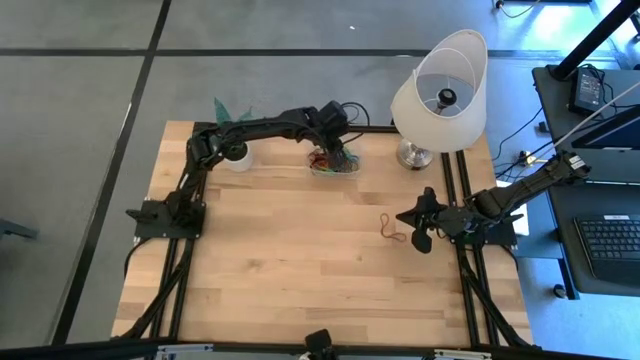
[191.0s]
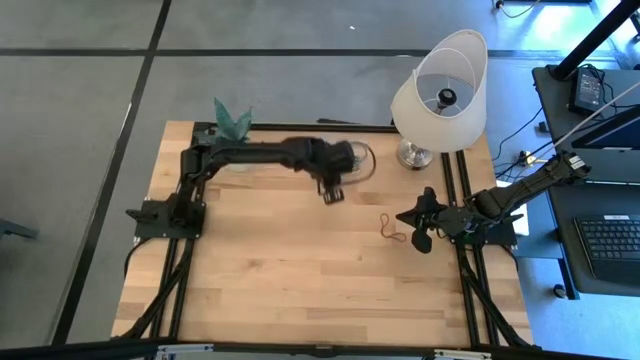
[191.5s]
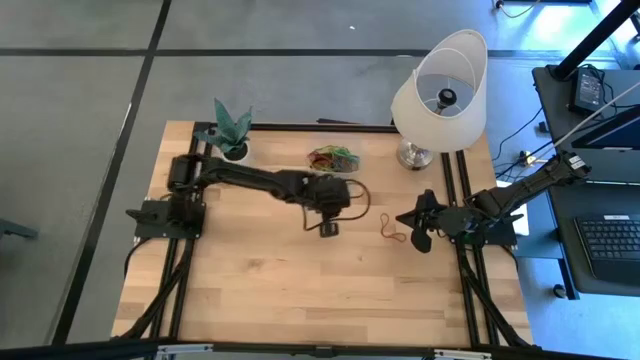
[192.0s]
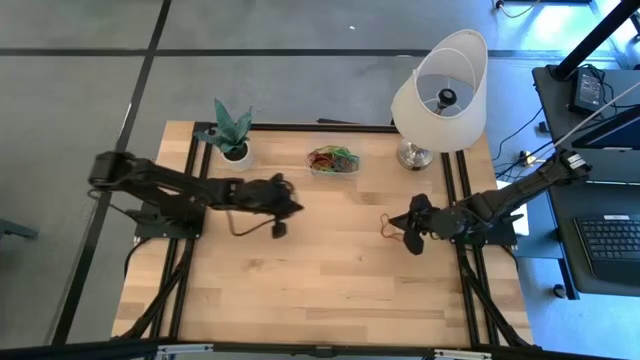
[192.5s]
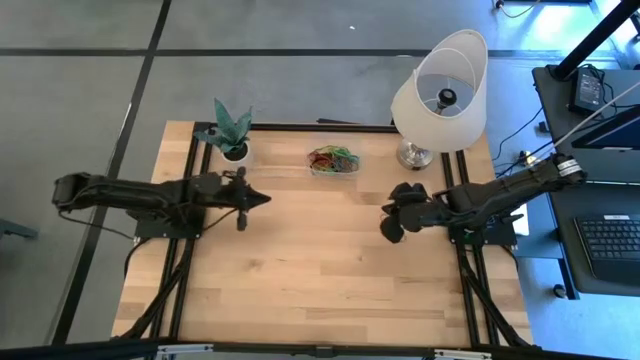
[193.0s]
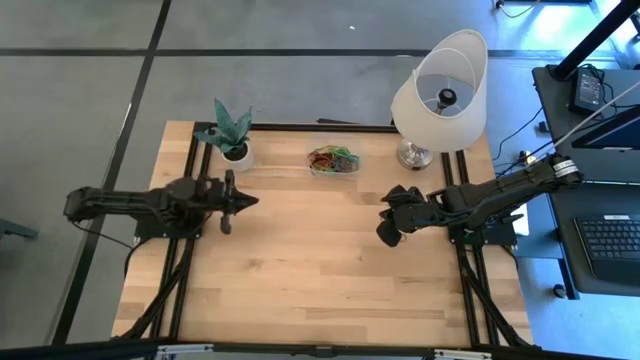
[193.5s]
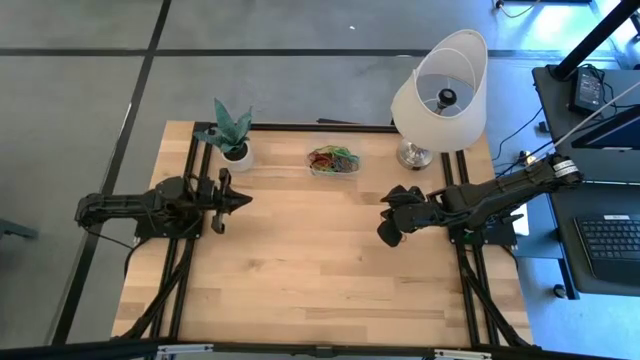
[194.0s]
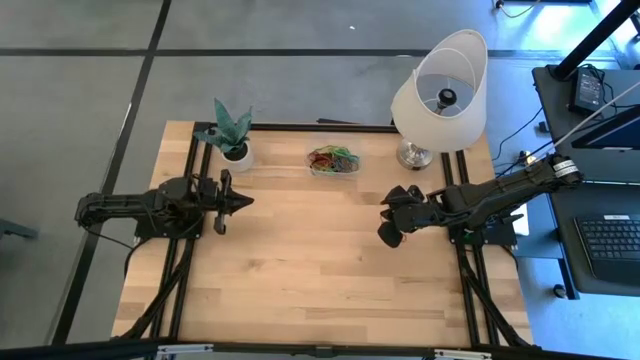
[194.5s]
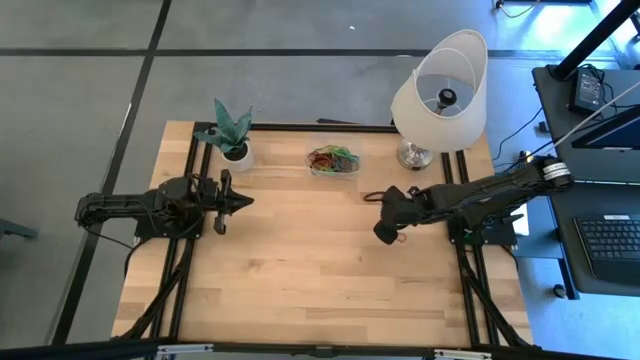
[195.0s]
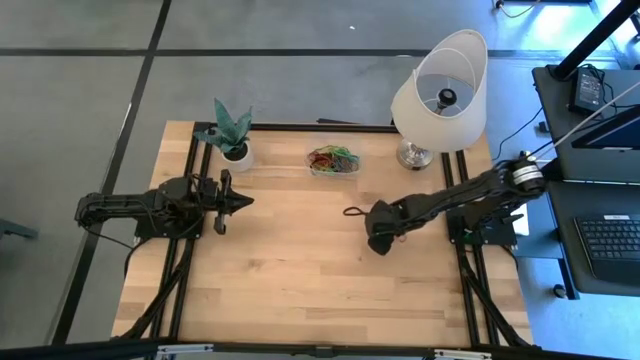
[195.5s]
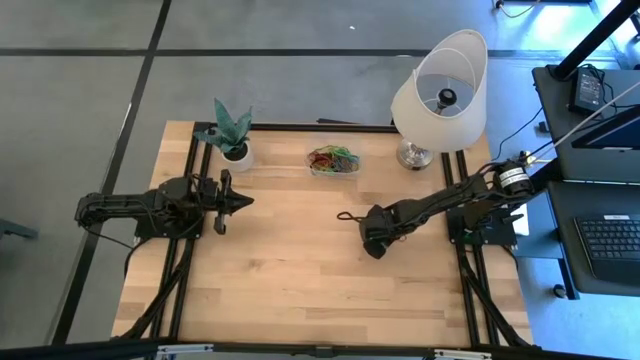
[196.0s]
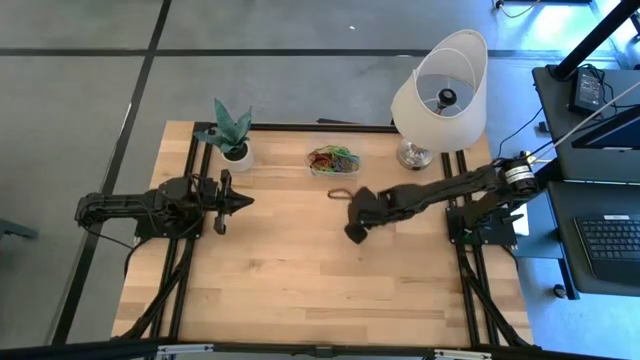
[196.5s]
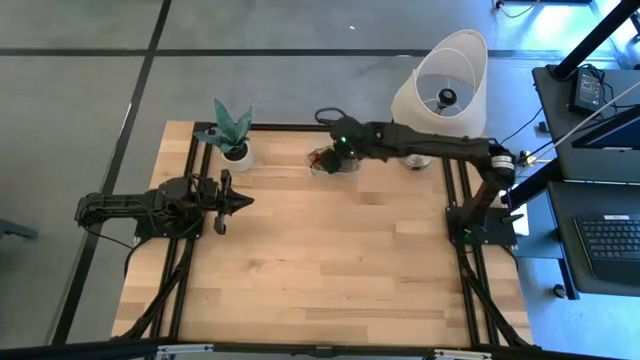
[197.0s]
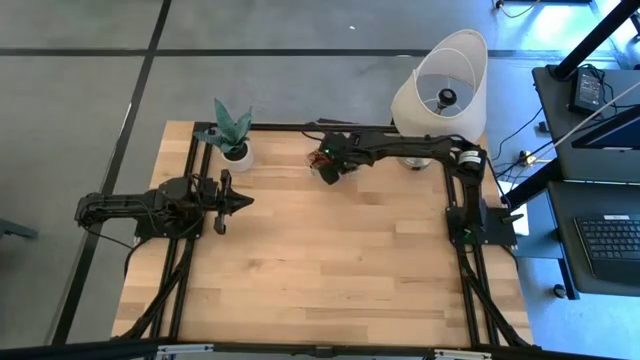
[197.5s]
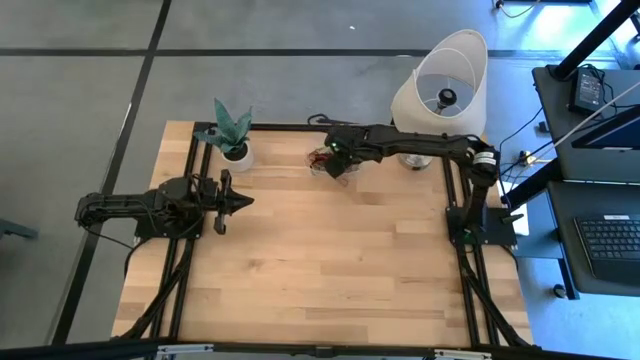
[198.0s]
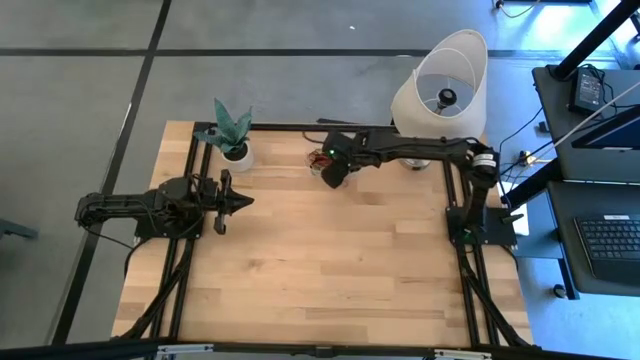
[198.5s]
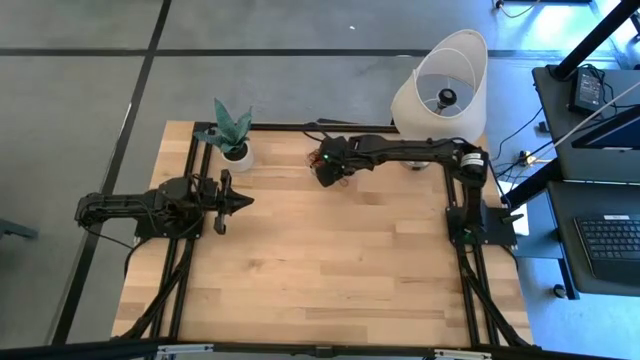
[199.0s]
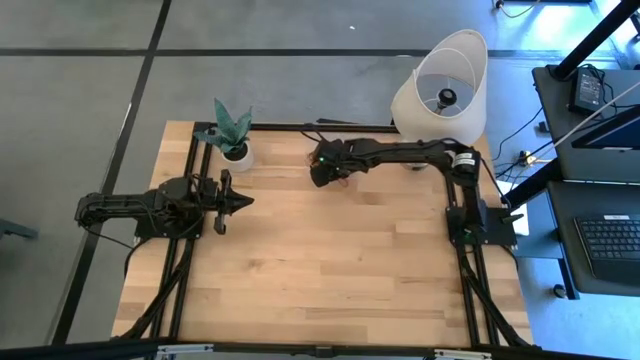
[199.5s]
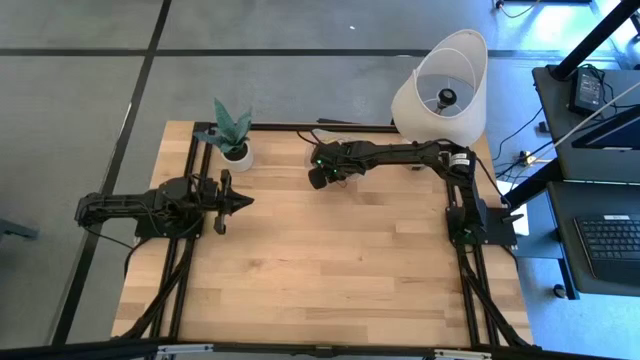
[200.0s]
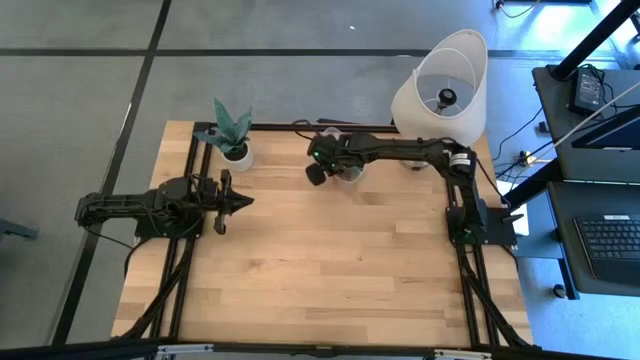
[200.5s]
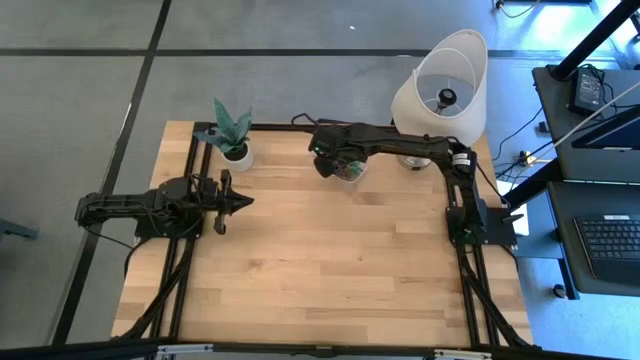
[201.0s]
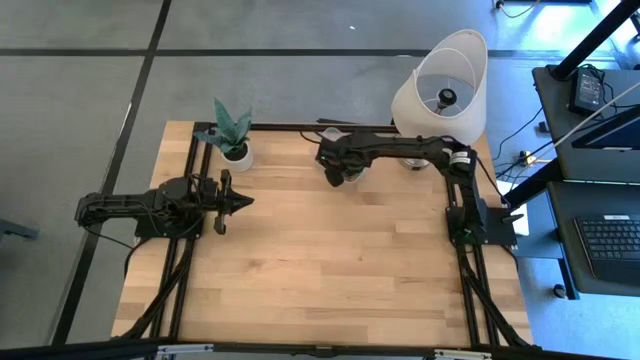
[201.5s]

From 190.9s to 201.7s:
Task: Pick and place rubber bands into bin
Put the red rubber band into the transparent bin

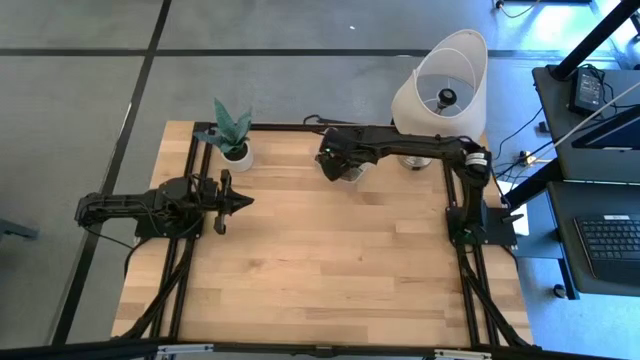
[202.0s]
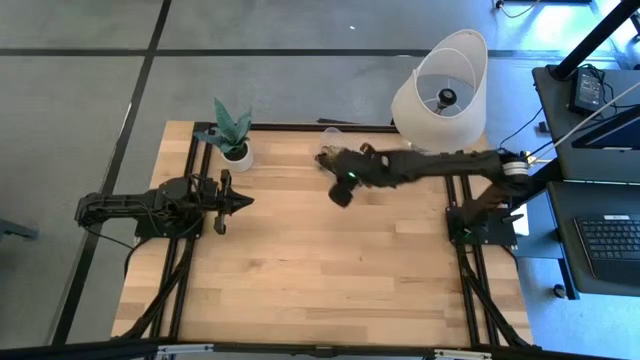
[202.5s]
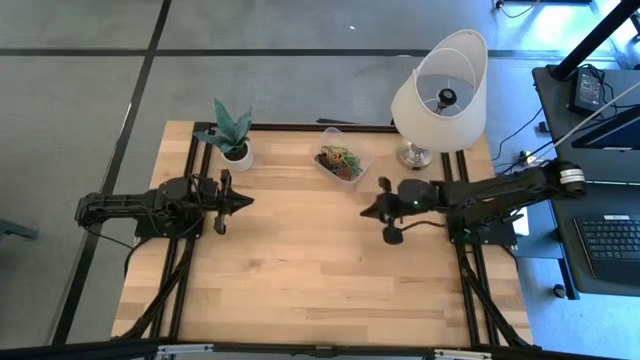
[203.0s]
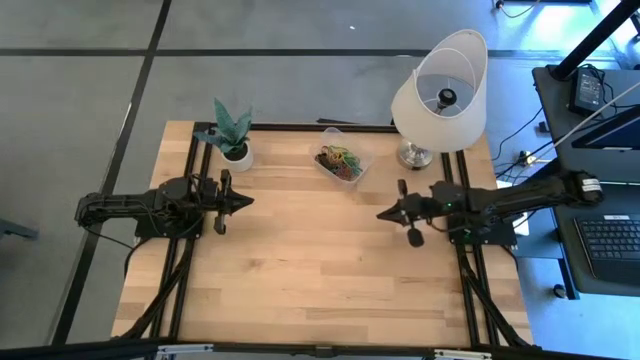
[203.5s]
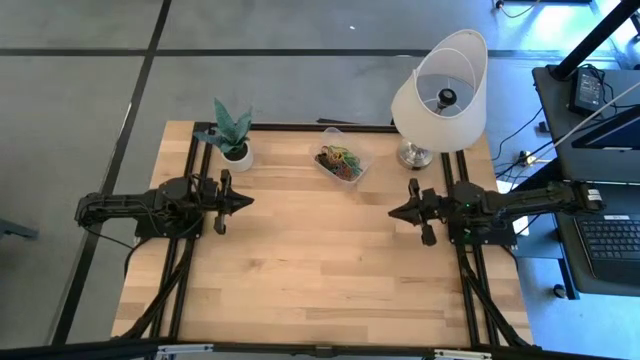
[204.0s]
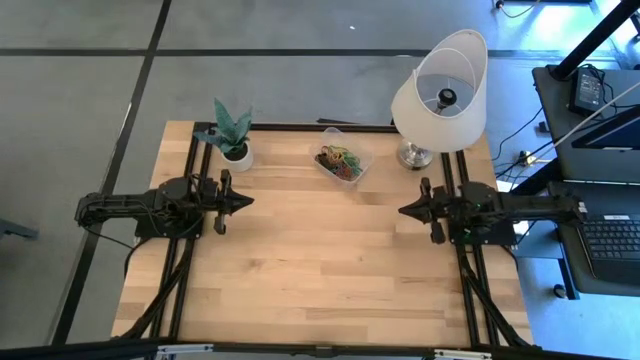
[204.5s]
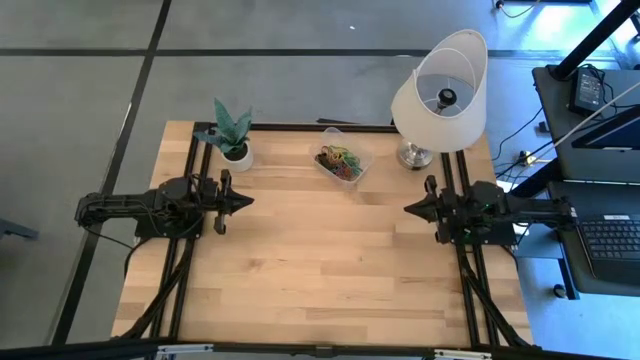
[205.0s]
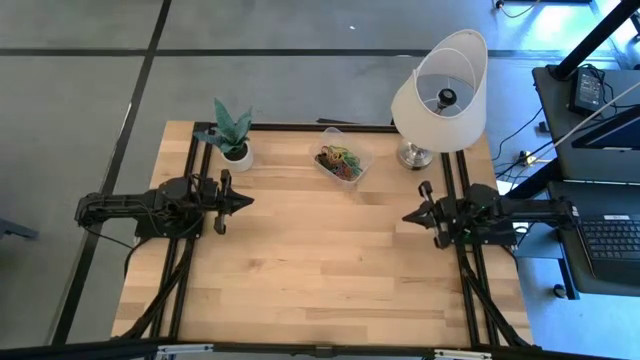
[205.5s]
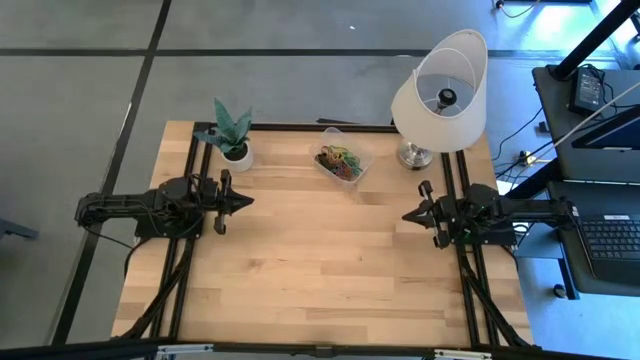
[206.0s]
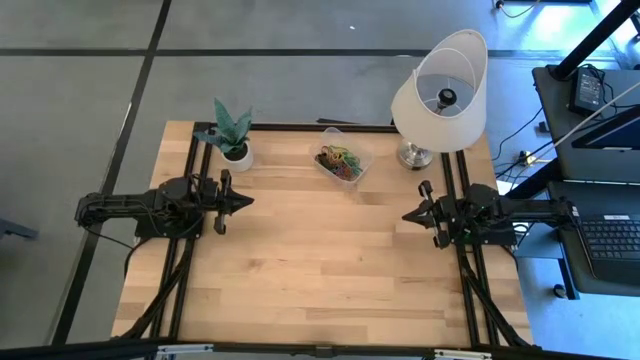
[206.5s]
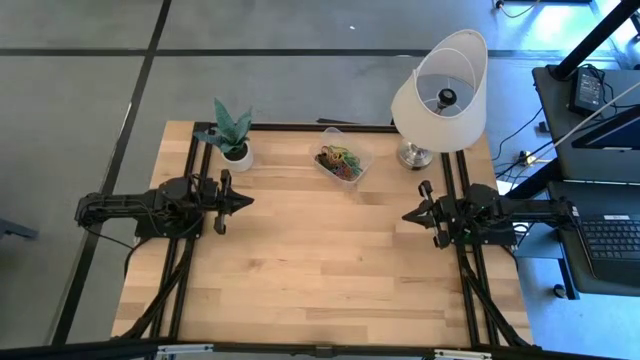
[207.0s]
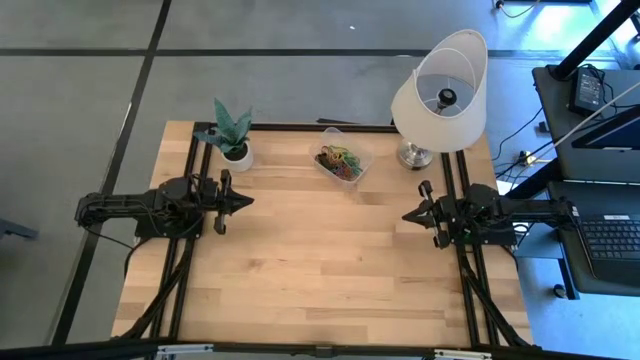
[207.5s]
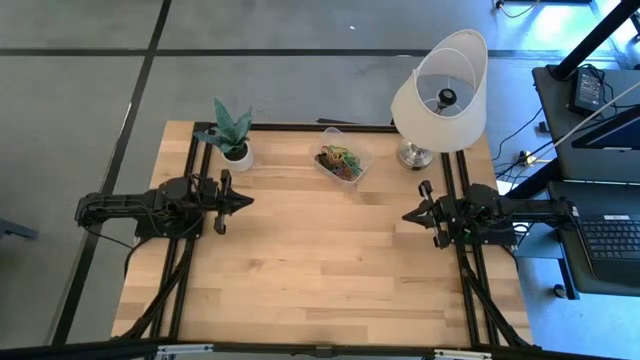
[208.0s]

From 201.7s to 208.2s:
Return to Home Position

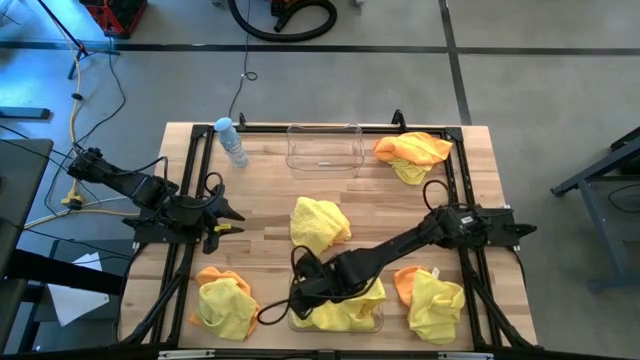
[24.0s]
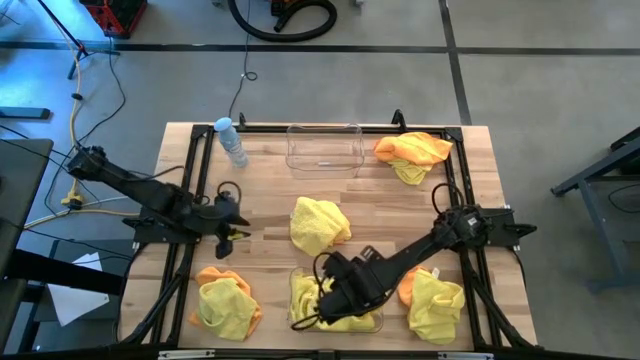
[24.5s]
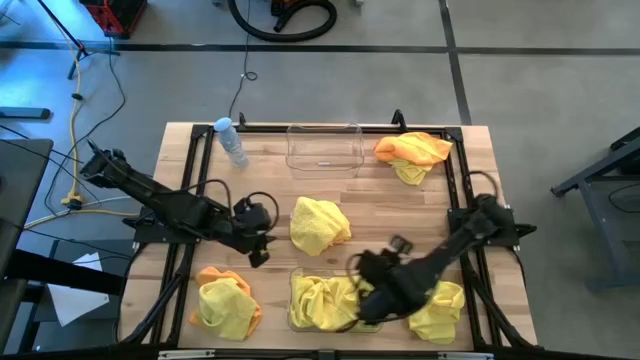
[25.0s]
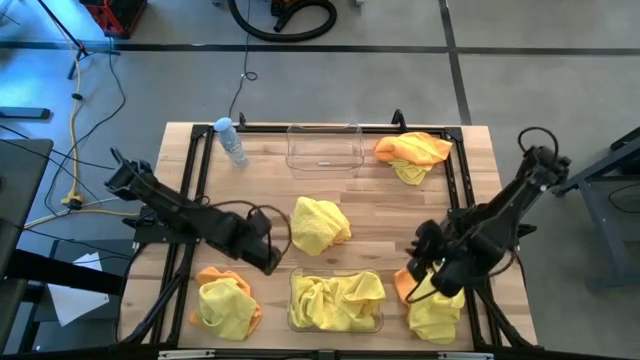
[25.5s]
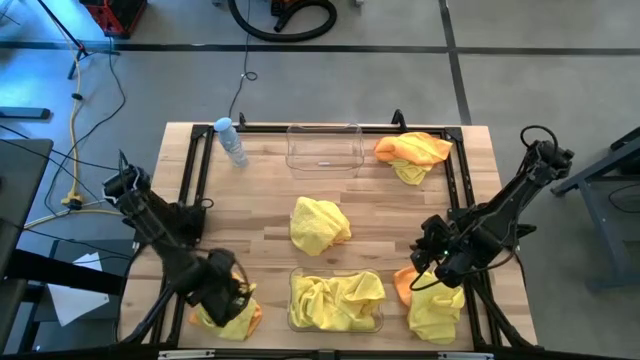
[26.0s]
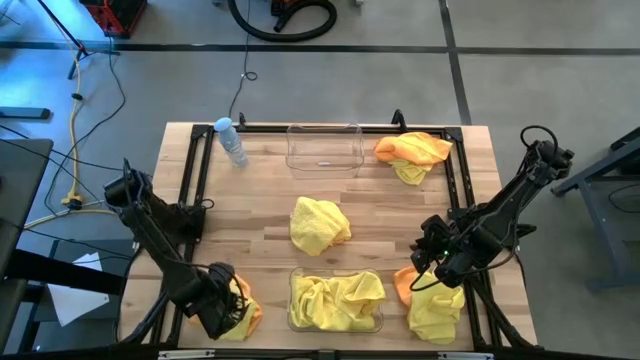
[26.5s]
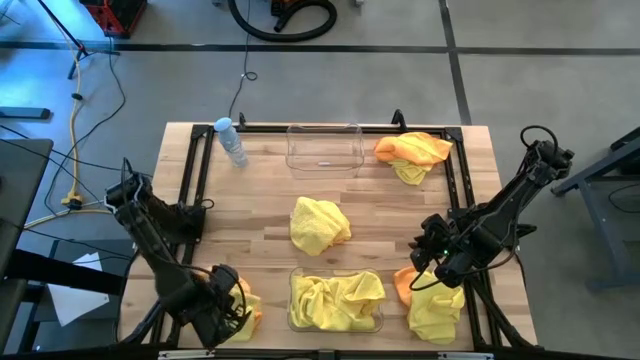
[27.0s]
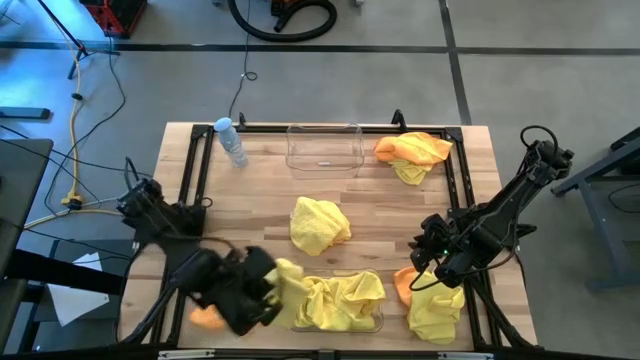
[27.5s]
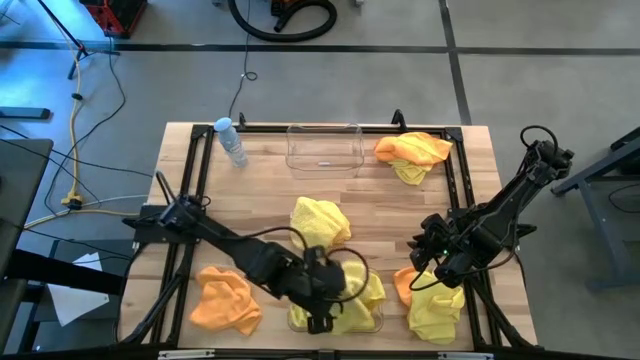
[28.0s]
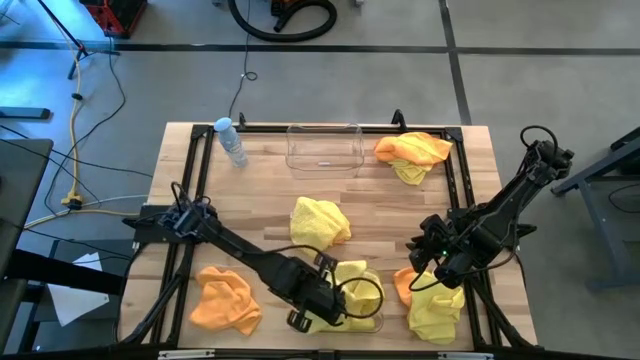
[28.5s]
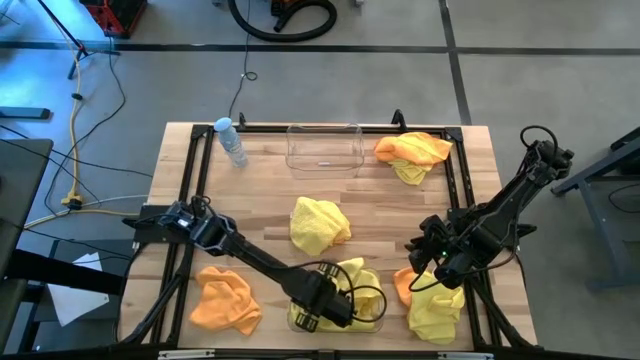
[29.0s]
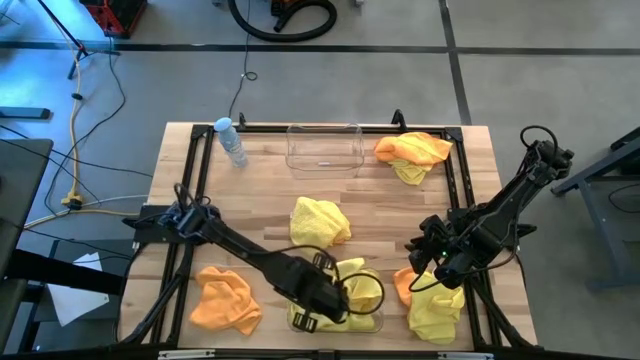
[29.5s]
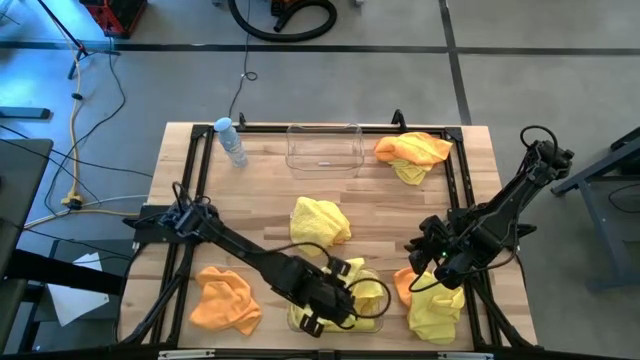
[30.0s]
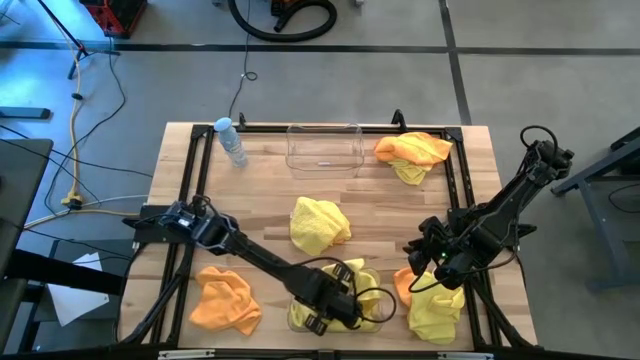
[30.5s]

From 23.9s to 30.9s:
Task: Sort microfiber towel by color & place in baskets
Put the yellow microfiber towel into the bottom transparent bin
